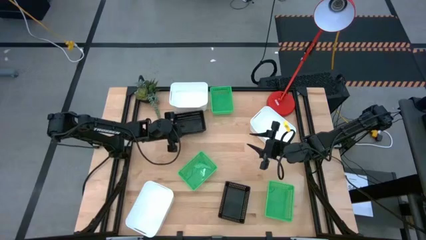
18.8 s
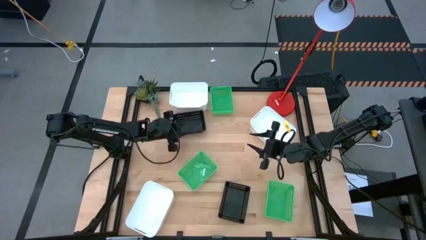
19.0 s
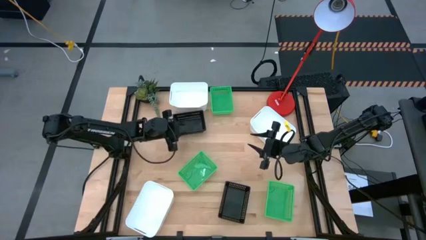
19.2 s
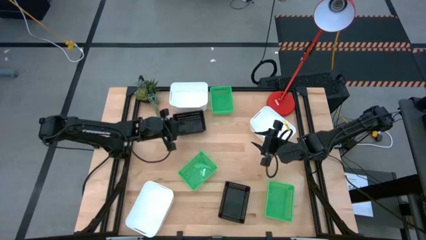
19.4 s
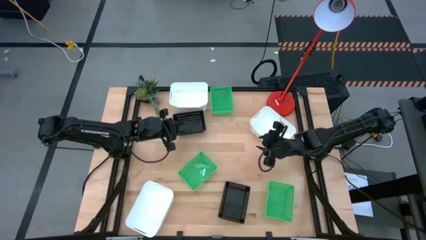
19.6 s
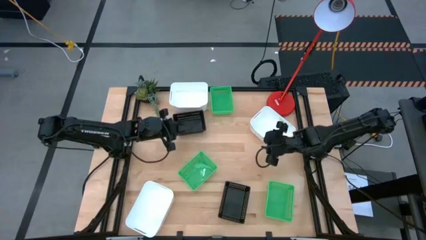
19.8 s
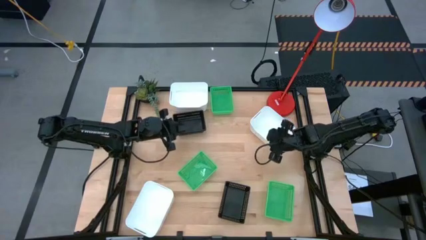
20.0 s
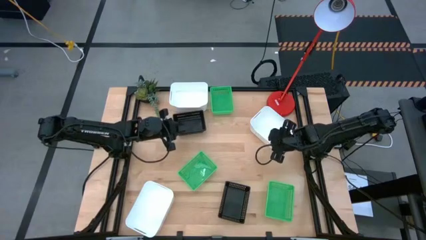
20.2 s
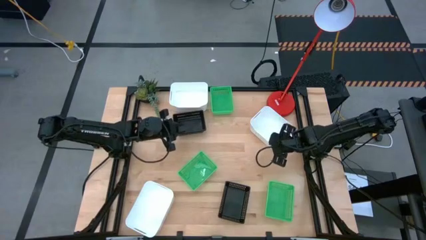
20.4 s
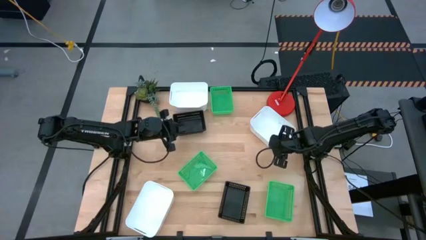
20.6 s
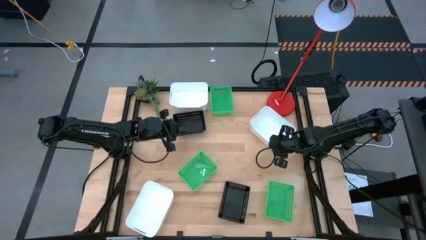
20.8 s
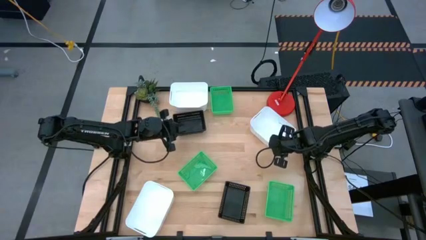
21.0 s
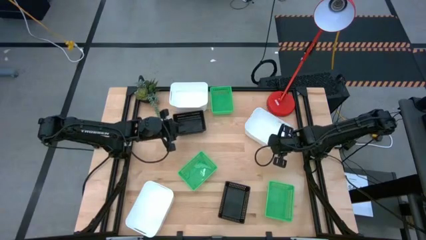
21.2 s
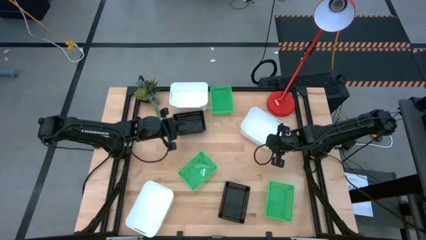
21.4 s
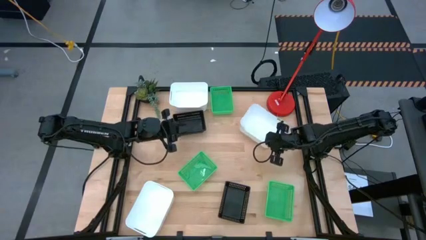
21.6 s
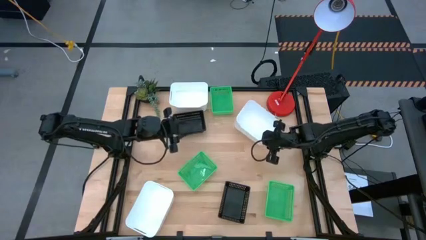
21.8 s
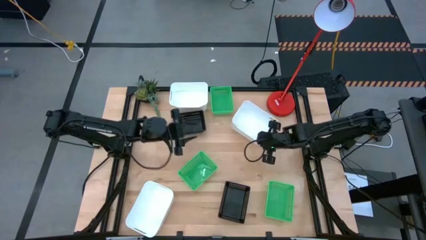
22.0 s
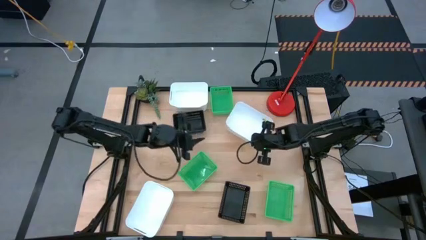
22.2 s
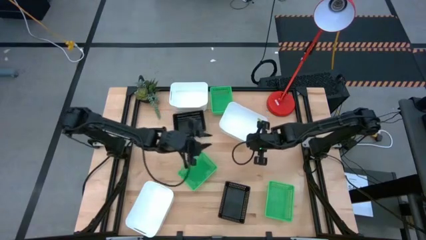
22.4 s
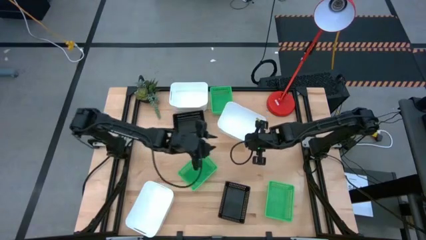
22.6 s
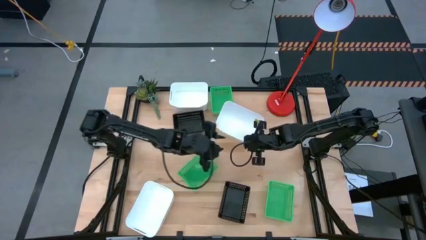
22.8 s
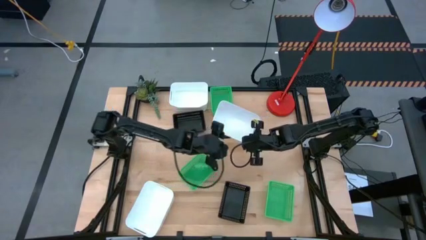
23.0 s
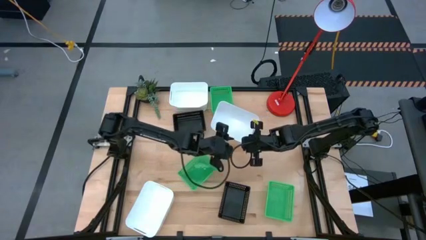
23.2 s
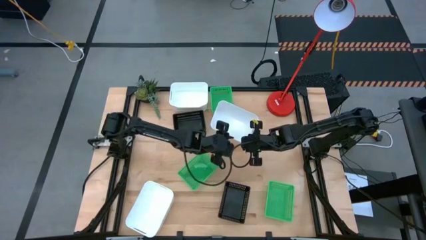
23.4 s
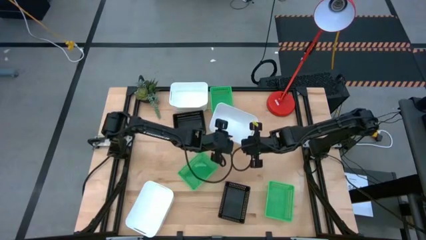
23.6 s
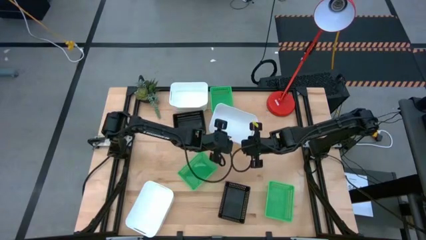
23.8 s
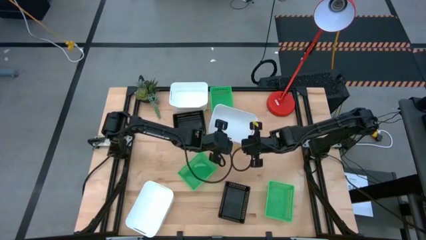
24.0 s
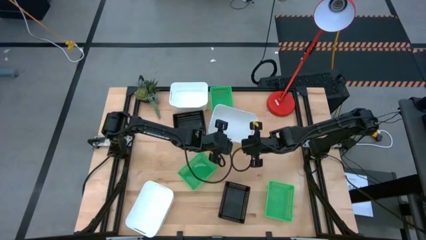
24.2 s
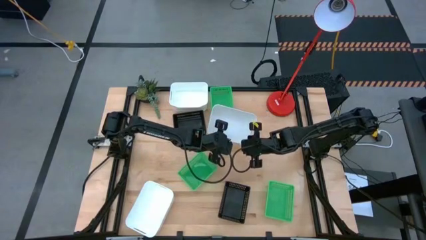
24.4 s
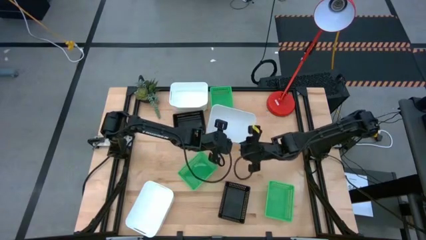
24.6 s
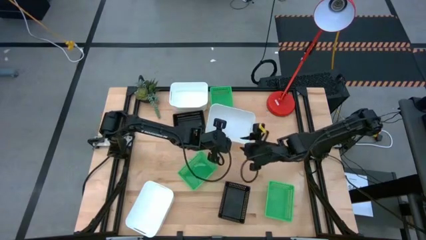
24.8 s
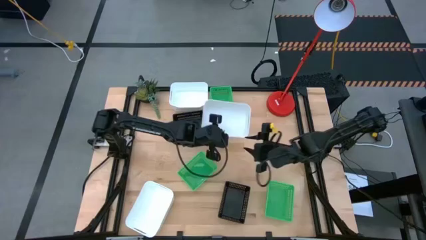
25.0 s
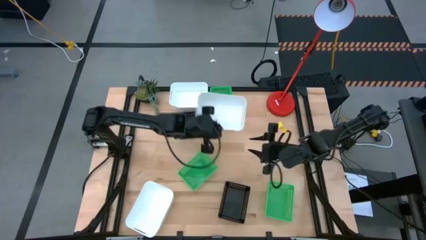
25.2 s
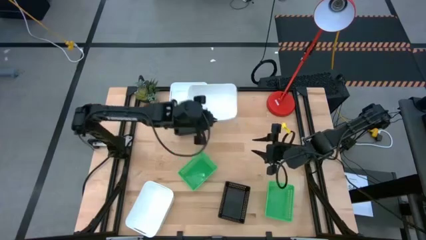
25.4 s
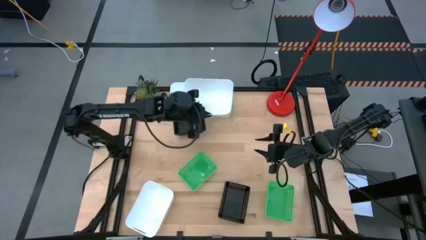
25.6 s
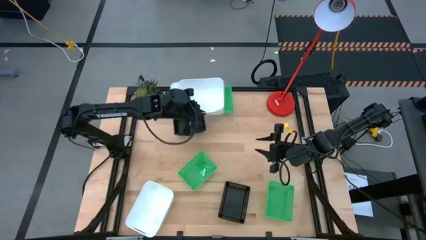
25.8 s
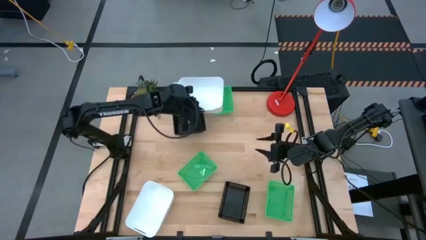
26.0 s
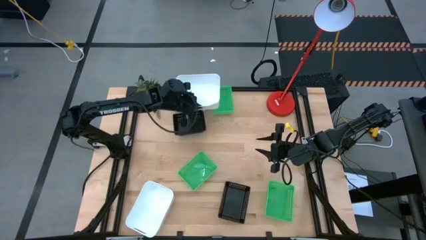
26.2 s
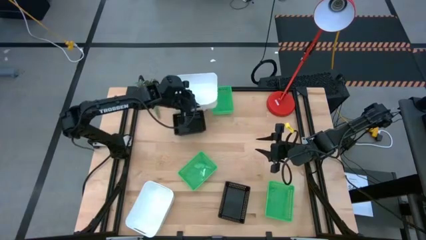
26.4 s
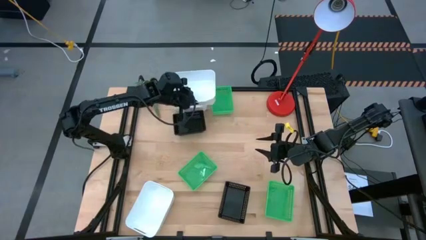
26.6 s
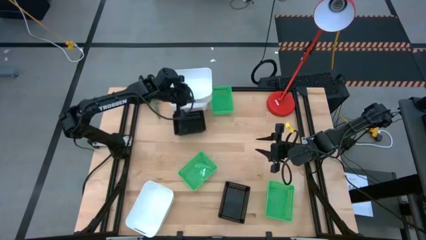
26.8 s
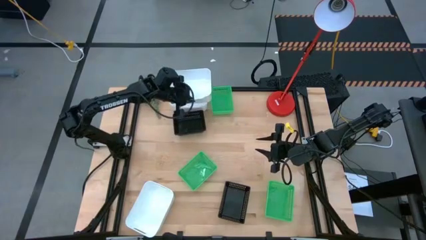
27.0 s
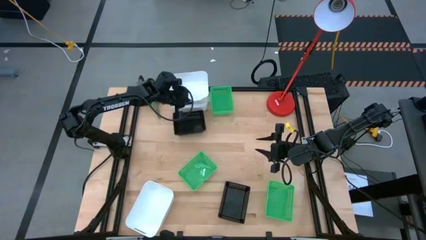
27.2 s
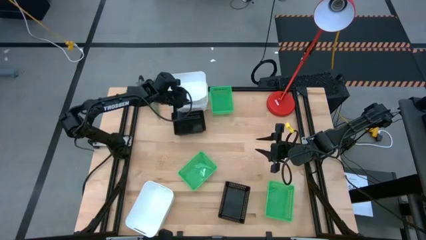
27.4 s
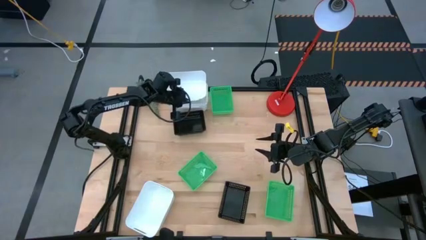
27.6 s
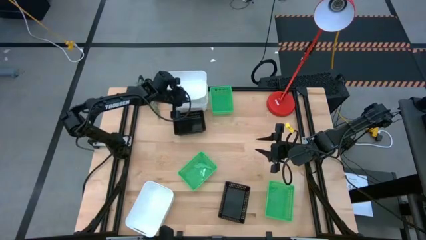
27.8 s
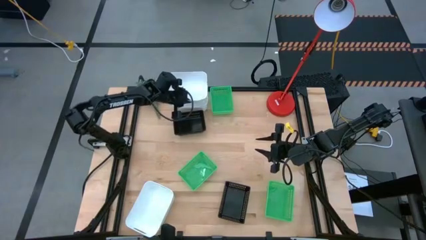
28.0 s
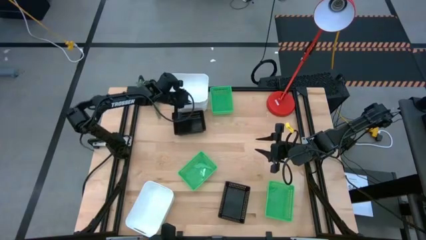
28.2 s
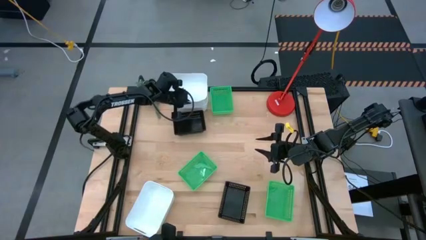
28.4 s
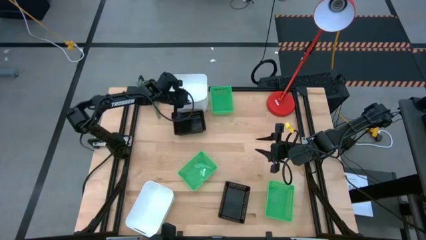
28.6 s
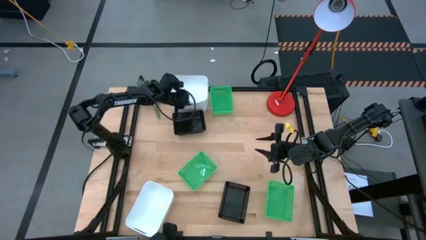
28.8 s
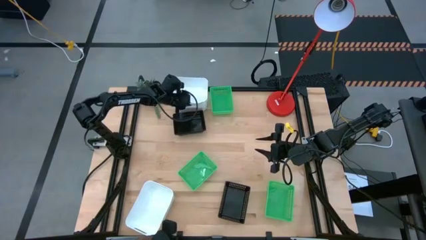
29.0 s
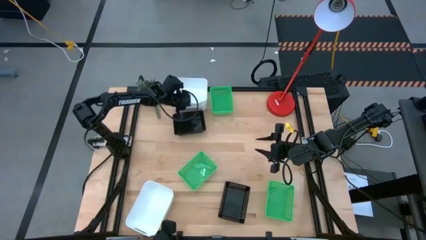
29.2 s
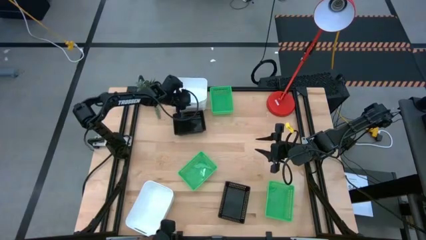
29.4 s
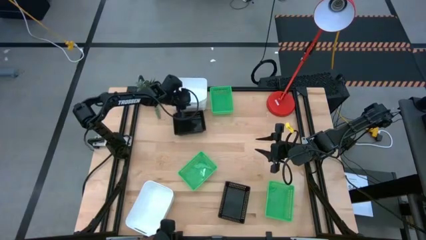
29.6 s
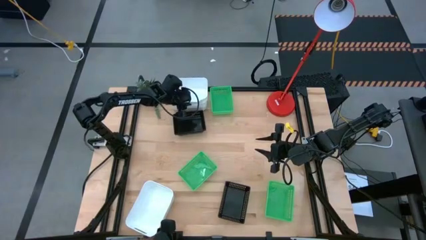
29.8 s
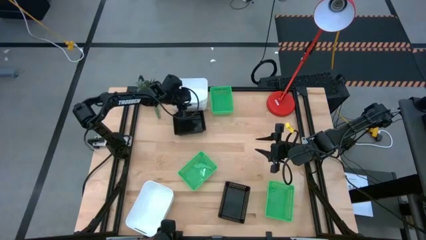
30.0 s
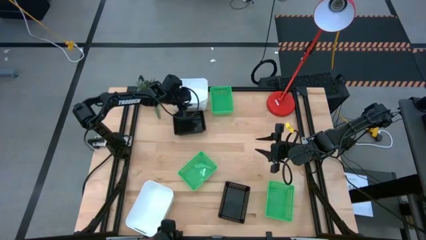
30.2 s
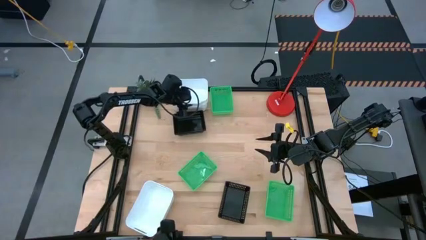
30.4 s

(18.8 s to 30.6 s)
Stack the top right white bin on top of the top left white bin

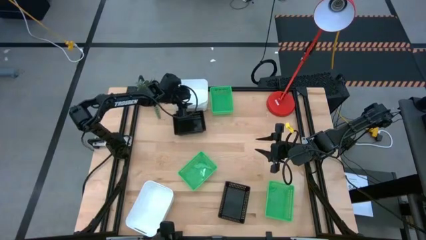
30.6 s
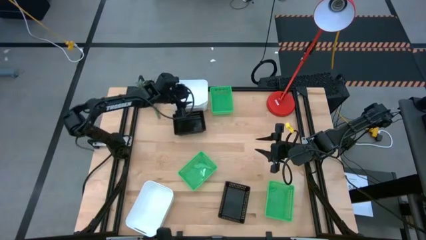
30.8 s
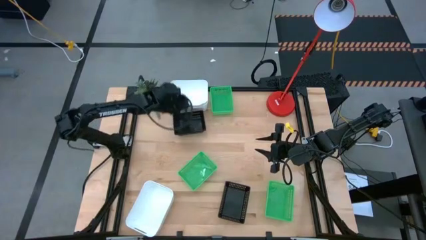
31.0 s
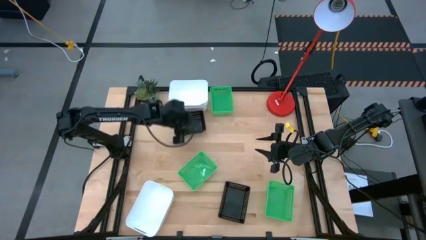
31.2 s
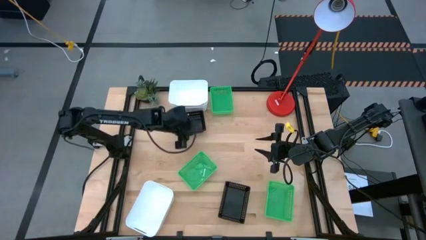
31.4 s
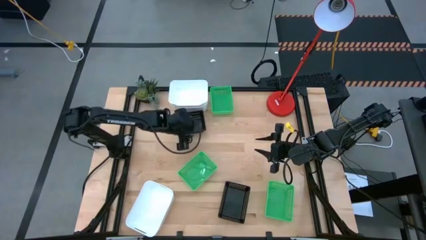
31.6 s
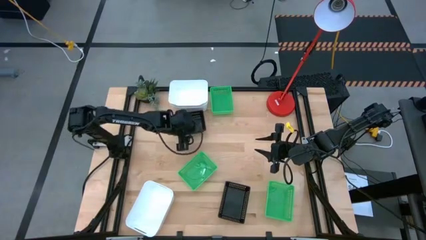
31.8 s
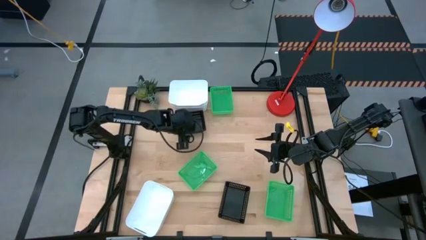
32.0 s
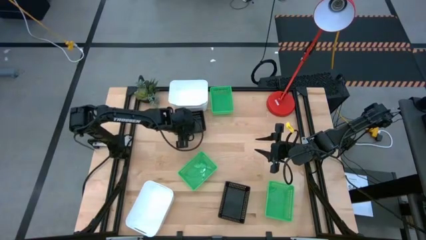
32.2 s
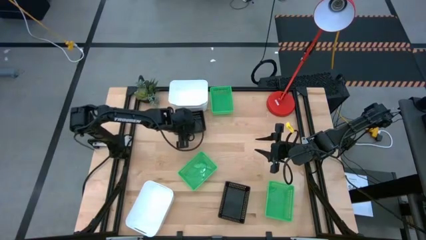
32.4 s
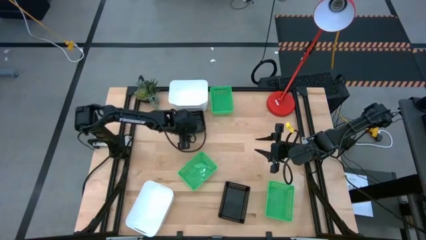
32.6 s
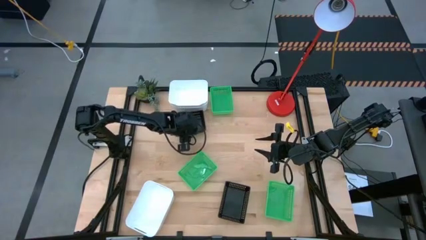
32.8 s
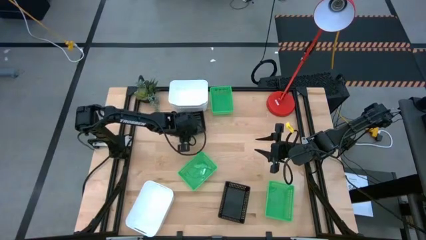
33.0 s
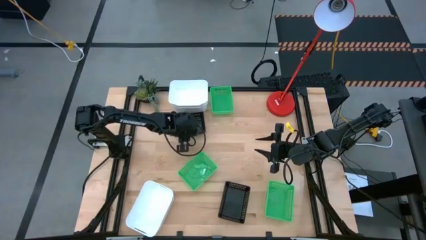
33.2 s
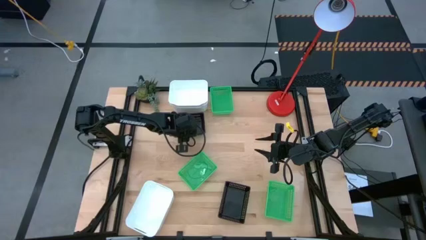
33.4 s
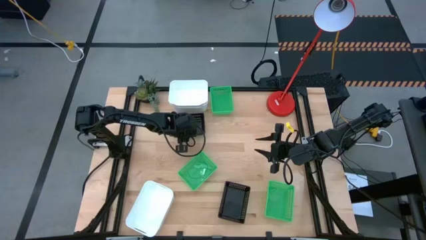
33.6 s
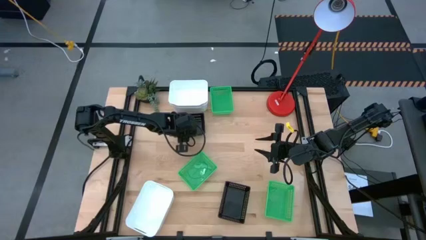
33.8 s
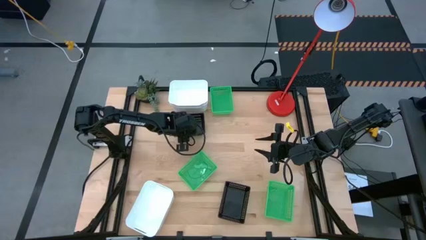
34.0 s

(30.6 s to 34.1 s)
Adjust the stacked black bins
